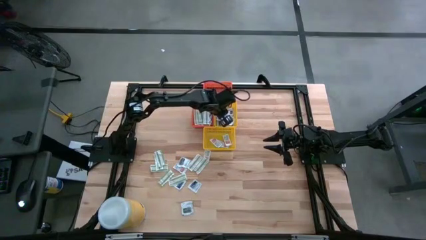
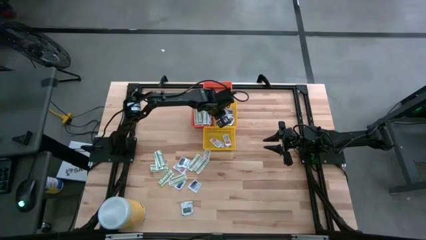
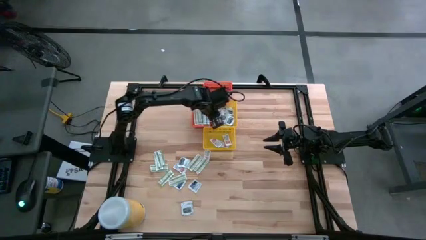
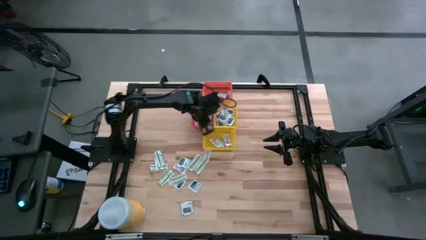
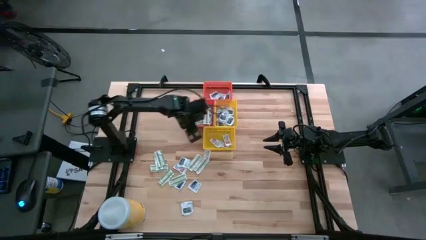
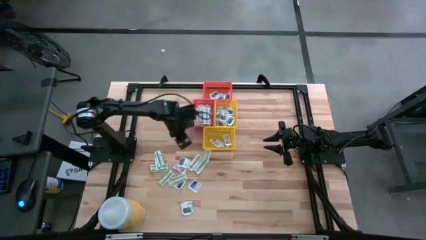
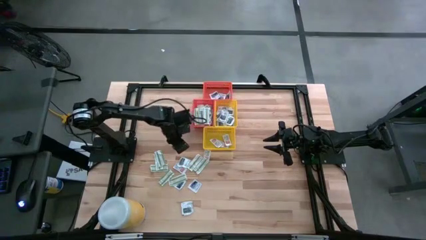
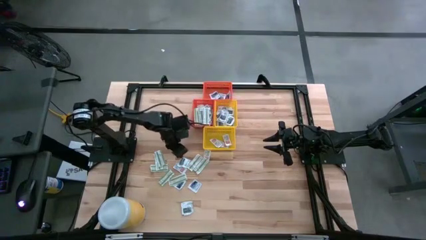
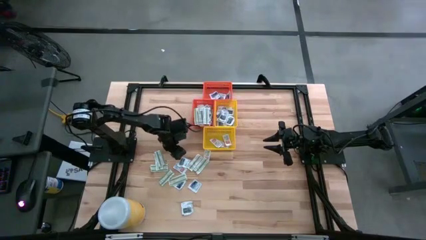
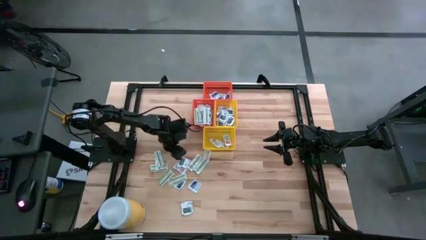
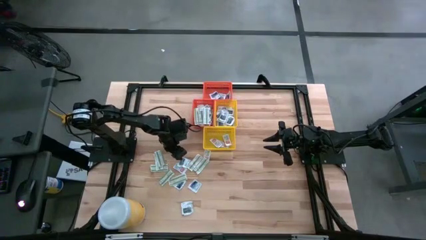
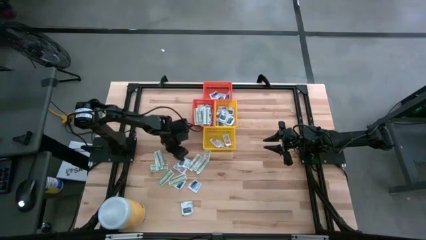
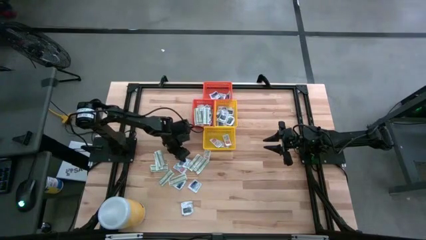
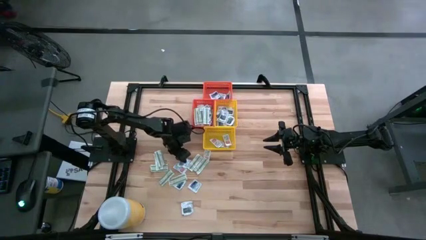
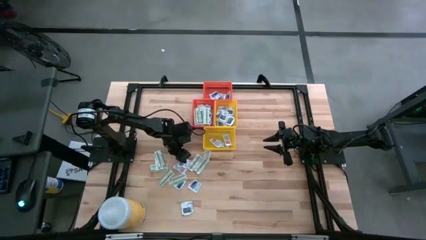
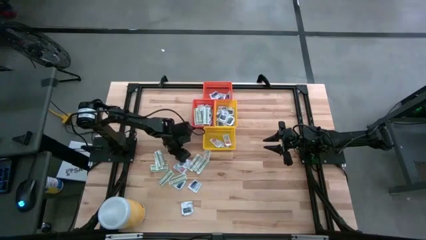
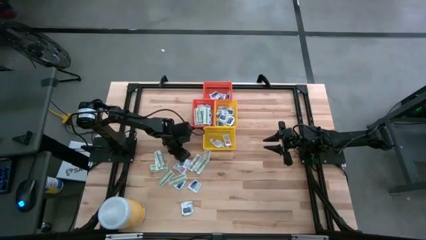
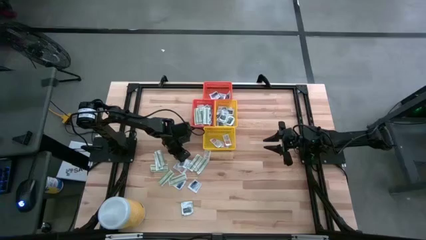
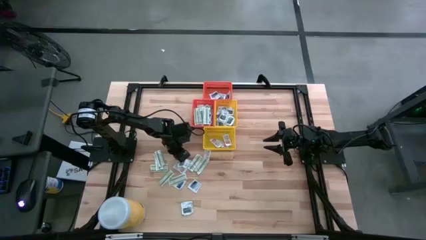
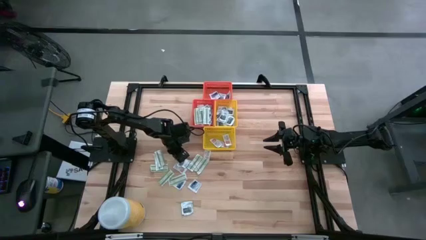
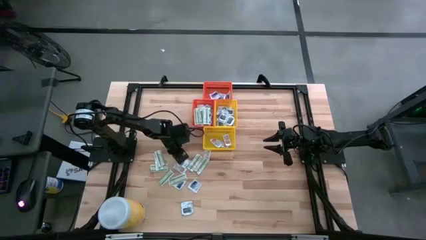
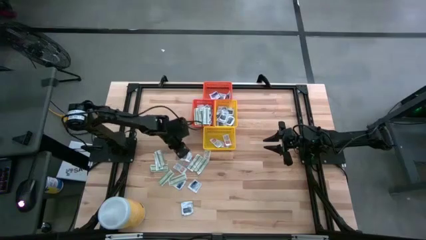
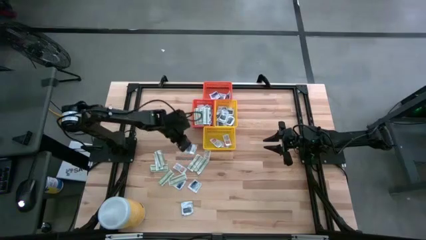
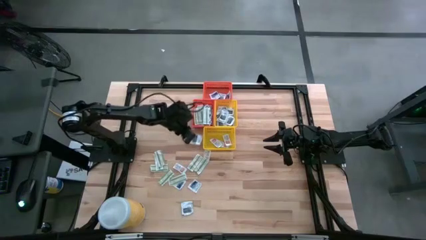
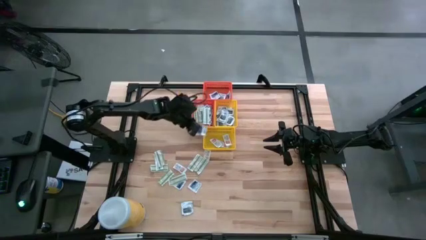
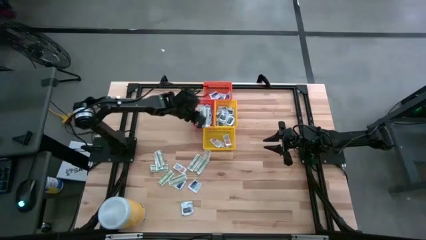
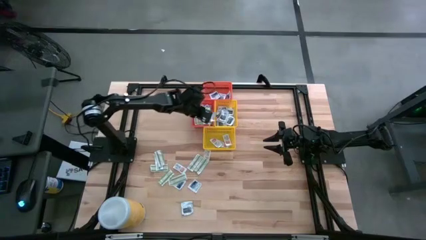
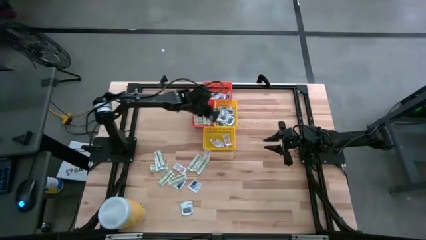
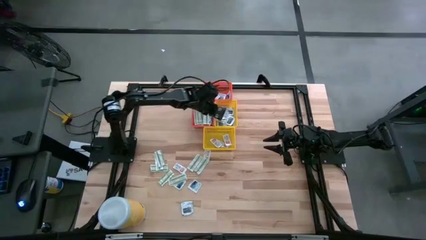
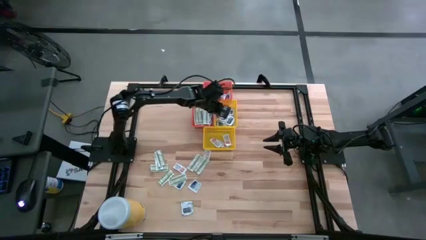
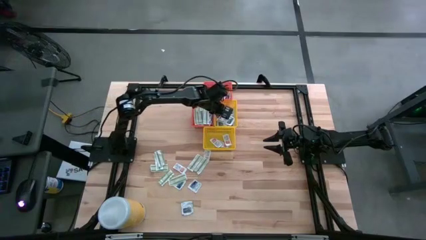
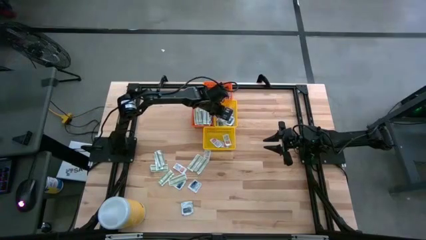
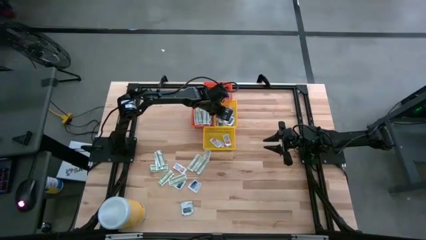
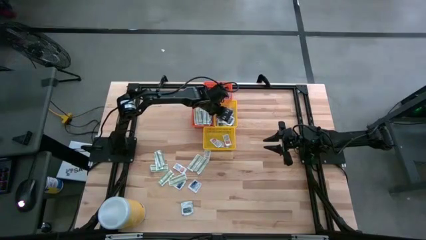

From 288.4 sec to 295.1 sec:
Task: Pick & Place First Aid Supplies
Put the towelette pack into the top yellow bin

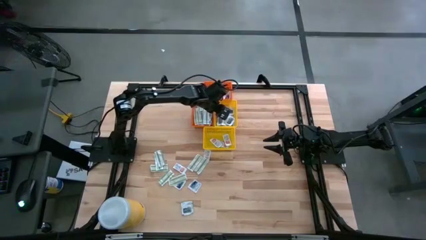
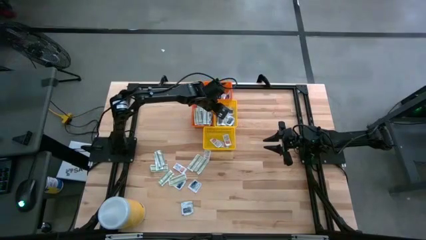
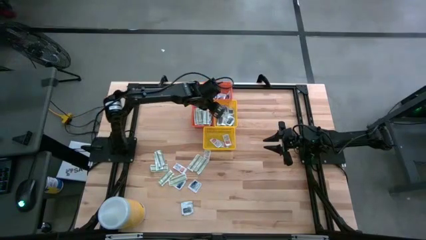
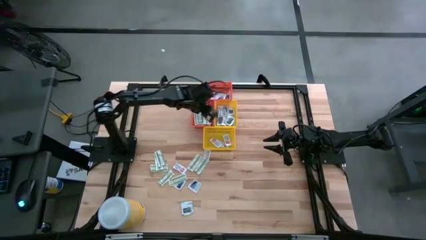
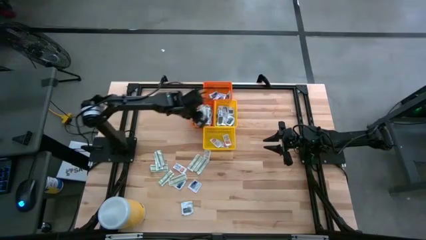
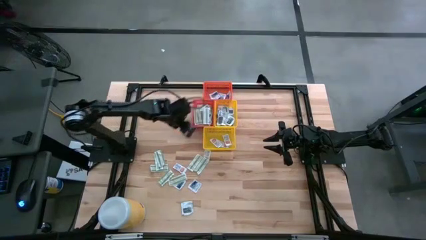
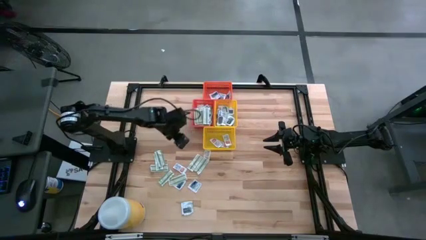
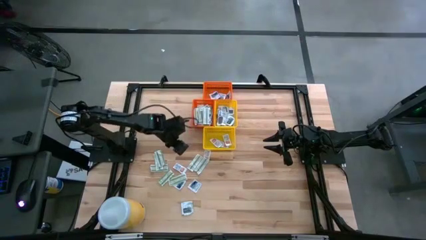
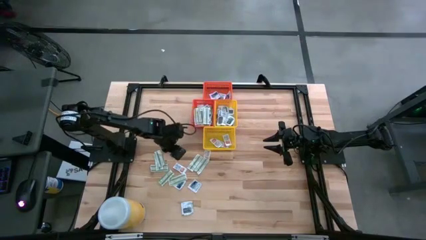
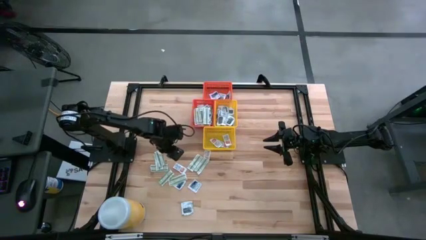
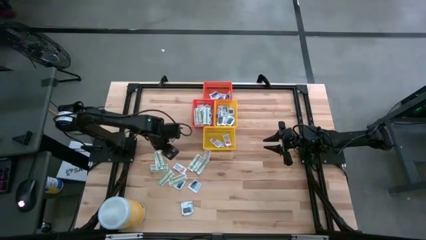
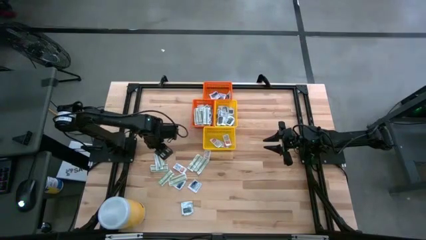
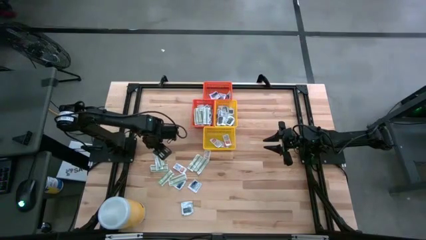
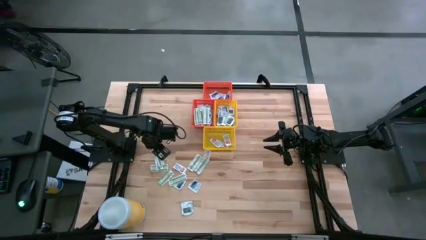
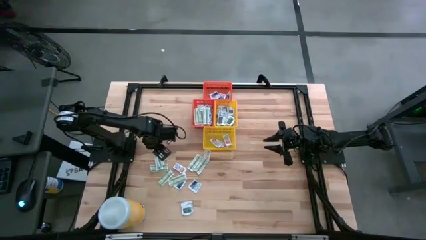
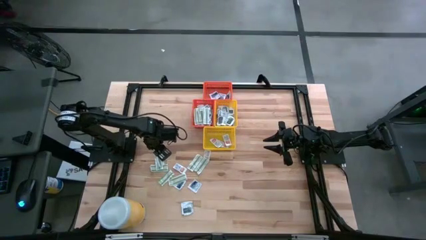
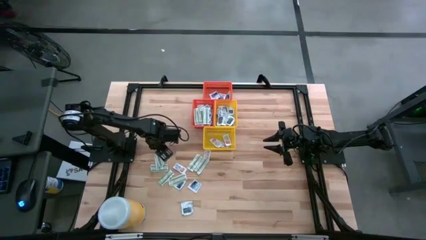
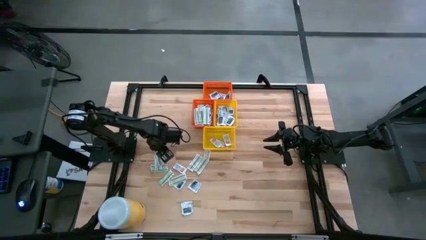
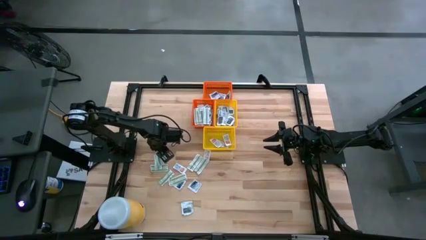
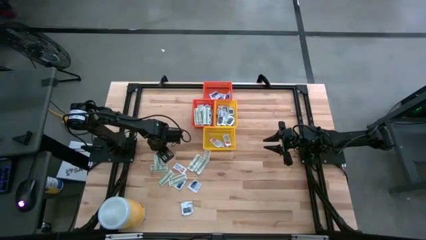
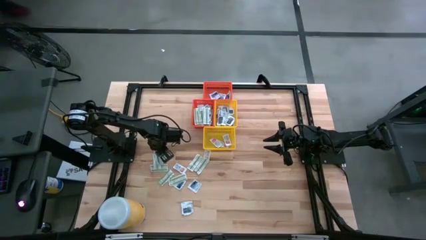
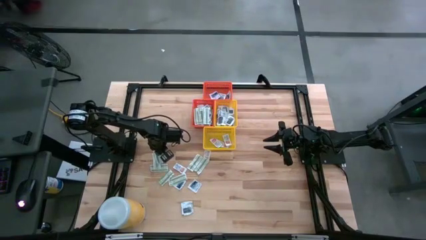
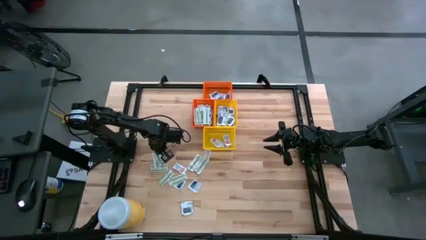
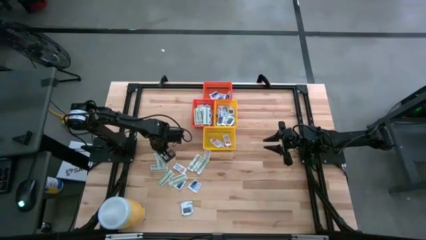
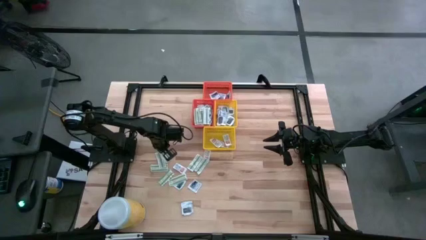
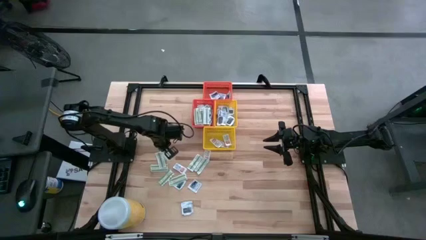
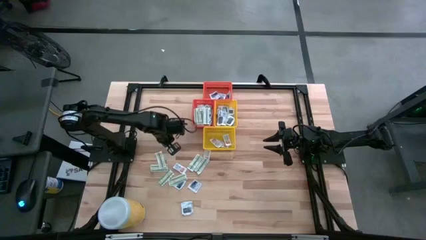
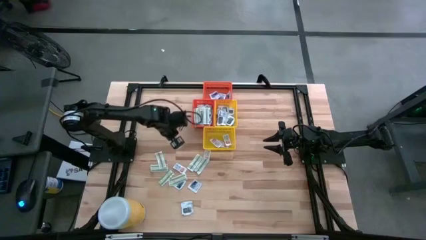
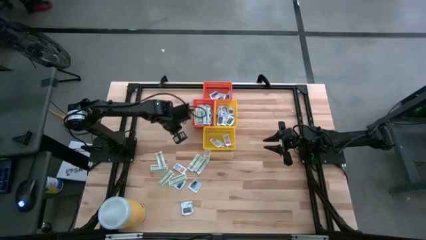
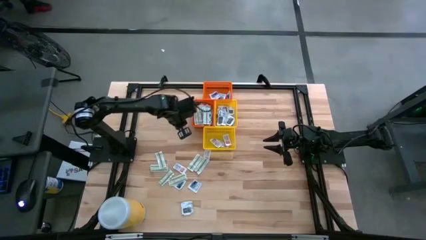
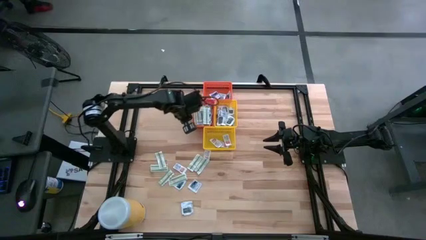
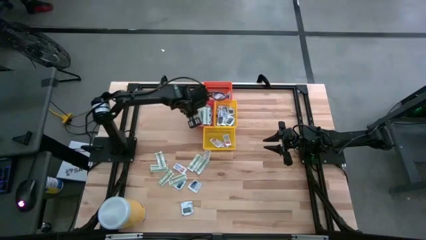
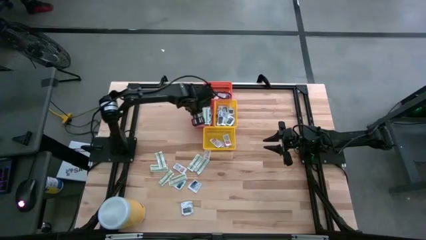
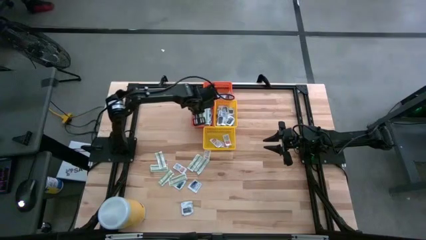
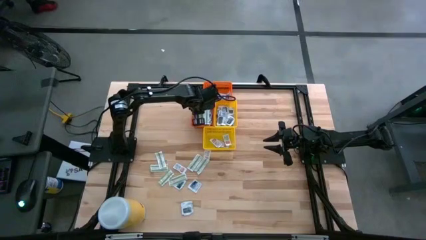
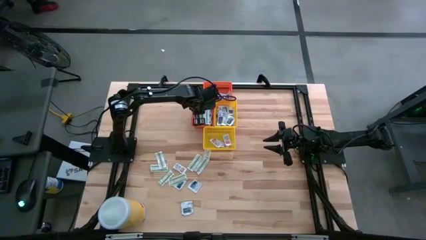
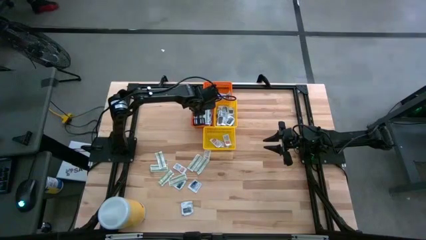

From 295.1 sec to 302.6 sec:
Put the bandage into the bottom orange bin
